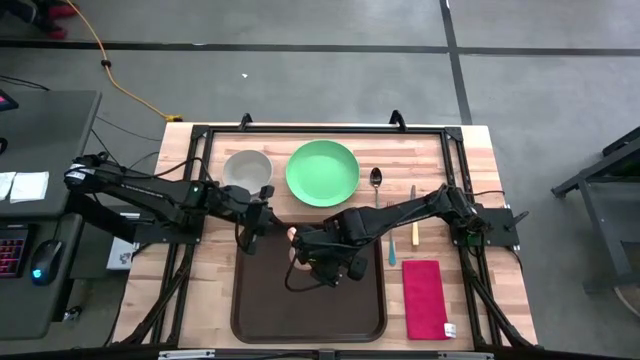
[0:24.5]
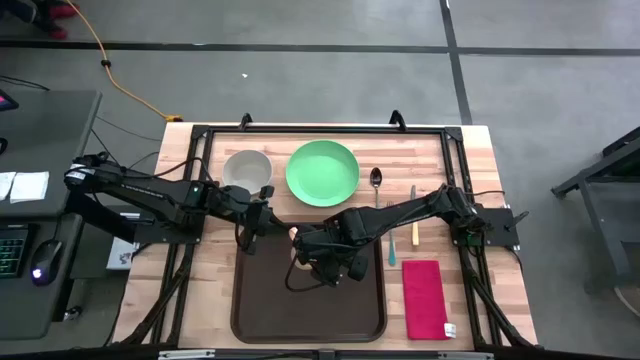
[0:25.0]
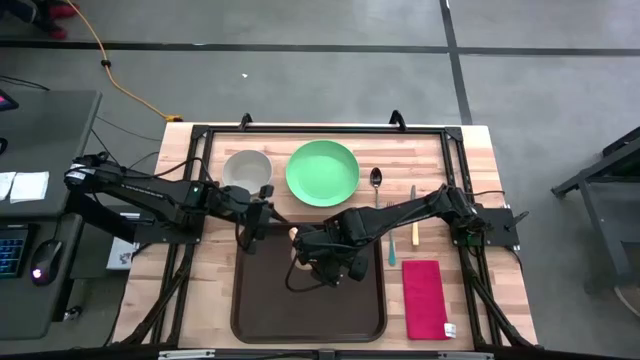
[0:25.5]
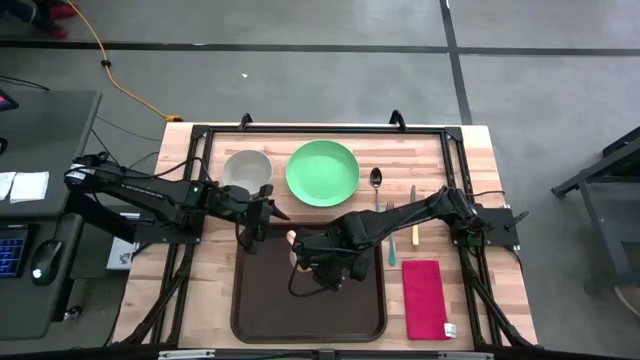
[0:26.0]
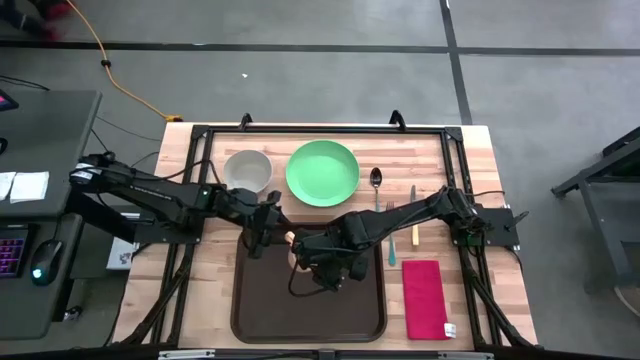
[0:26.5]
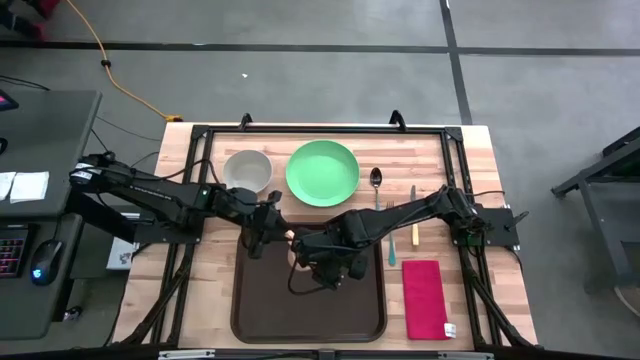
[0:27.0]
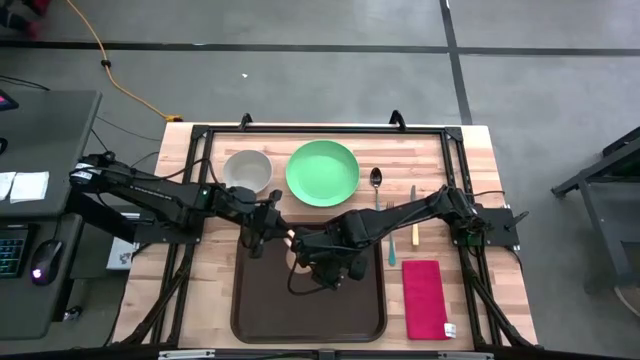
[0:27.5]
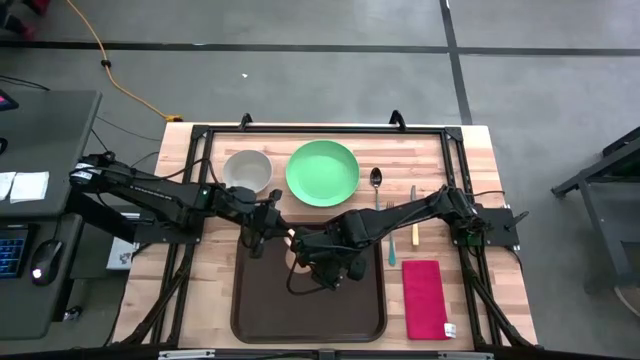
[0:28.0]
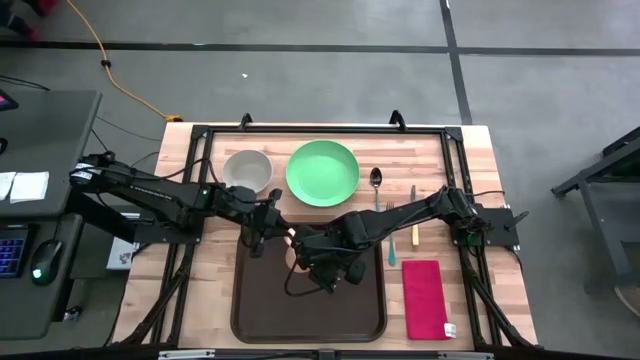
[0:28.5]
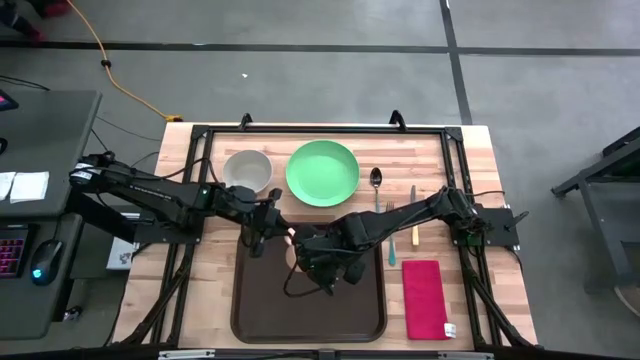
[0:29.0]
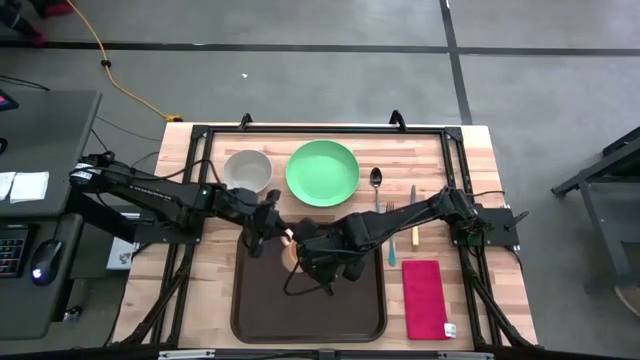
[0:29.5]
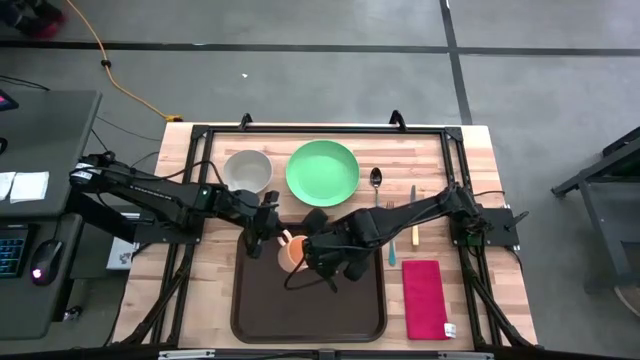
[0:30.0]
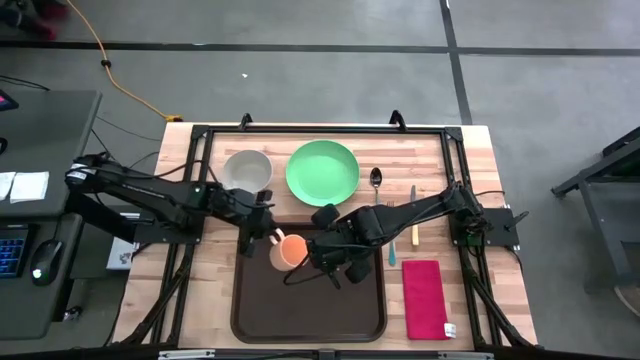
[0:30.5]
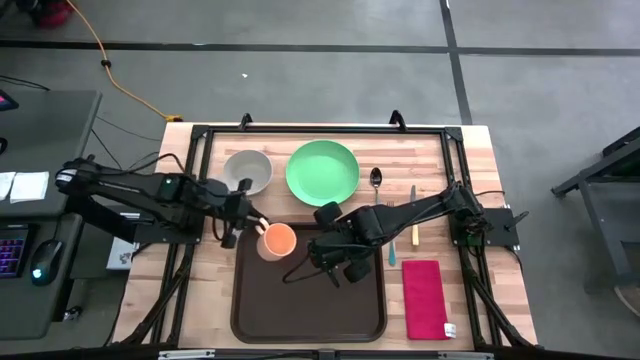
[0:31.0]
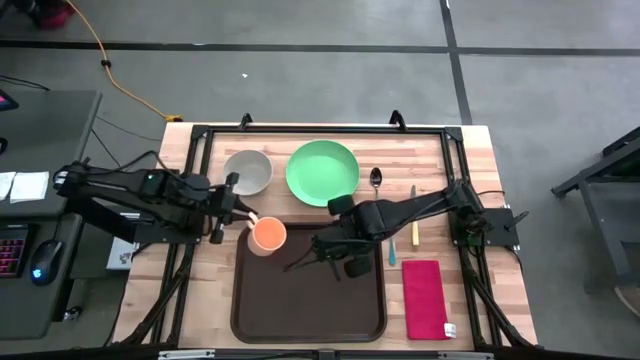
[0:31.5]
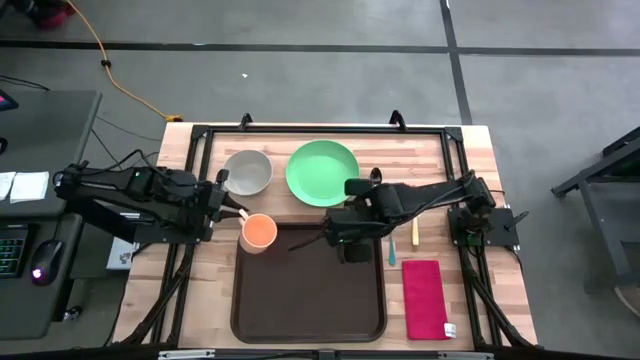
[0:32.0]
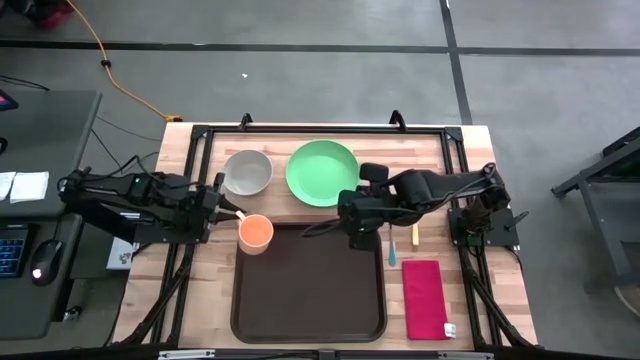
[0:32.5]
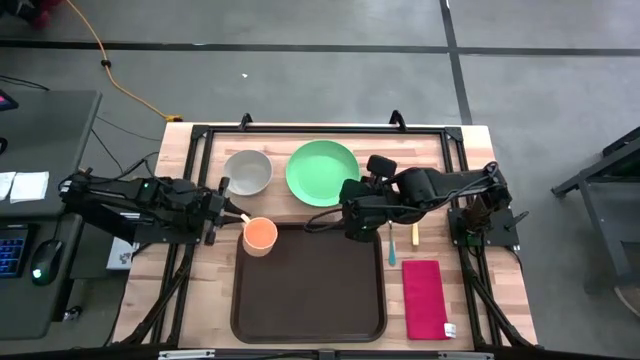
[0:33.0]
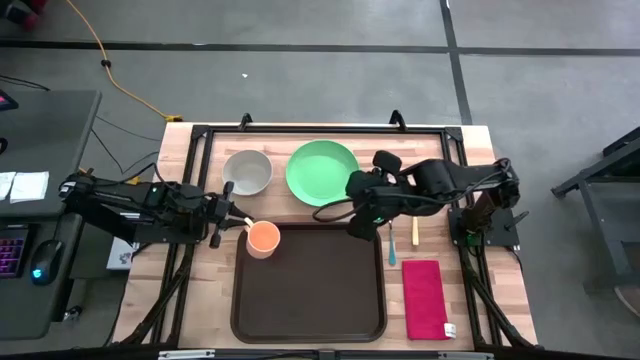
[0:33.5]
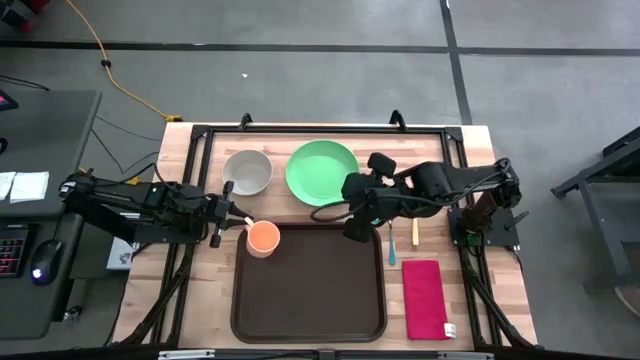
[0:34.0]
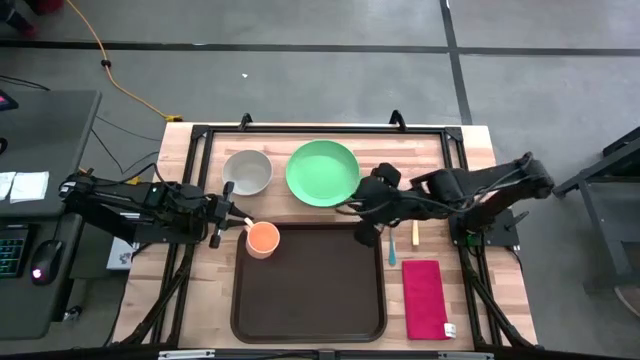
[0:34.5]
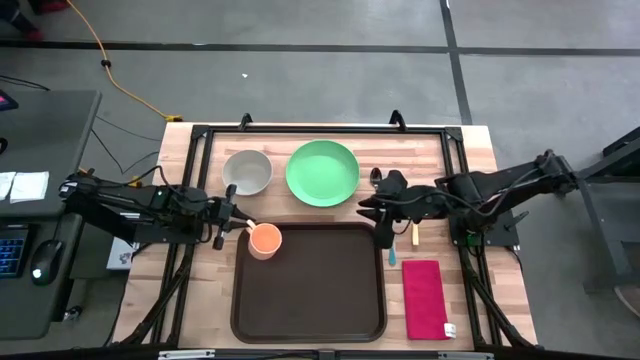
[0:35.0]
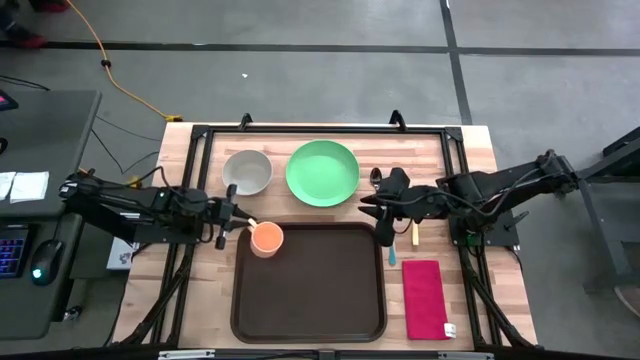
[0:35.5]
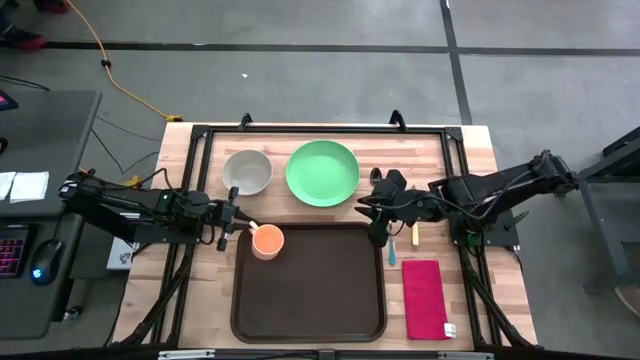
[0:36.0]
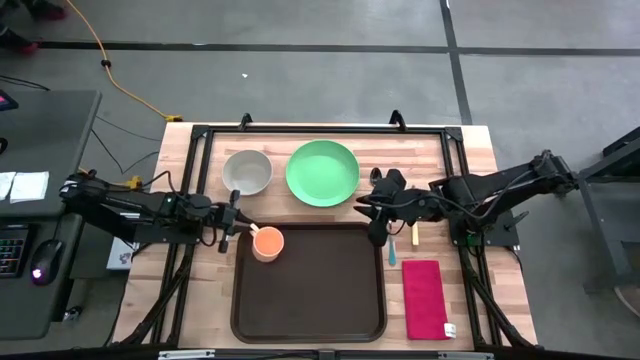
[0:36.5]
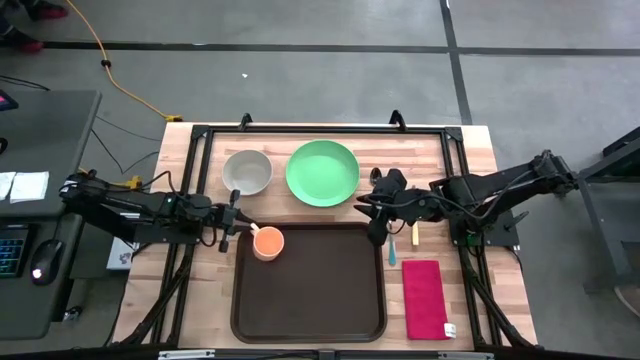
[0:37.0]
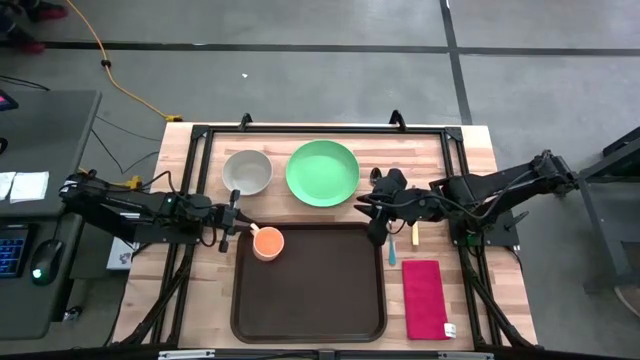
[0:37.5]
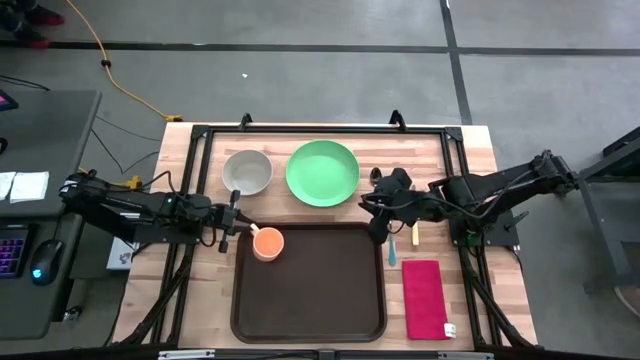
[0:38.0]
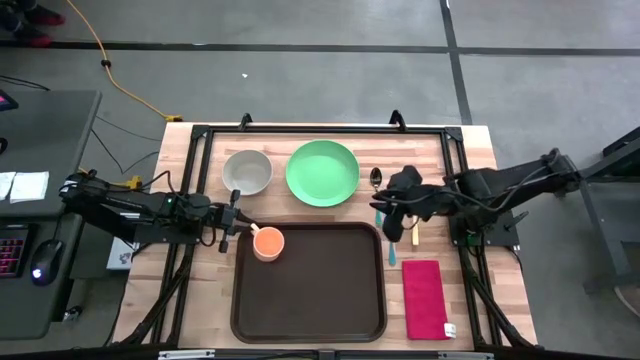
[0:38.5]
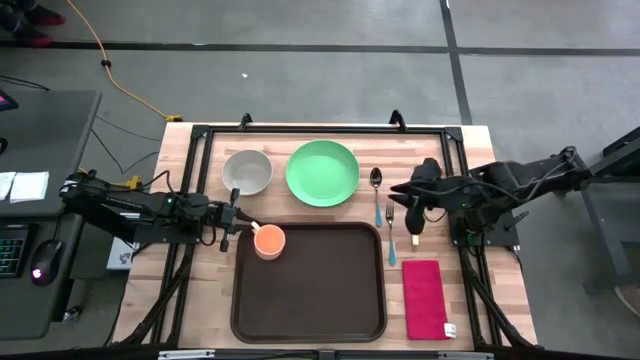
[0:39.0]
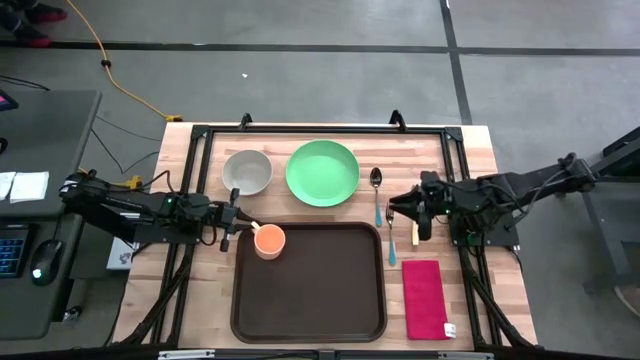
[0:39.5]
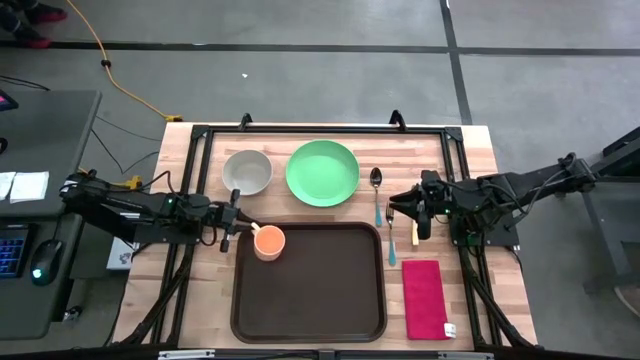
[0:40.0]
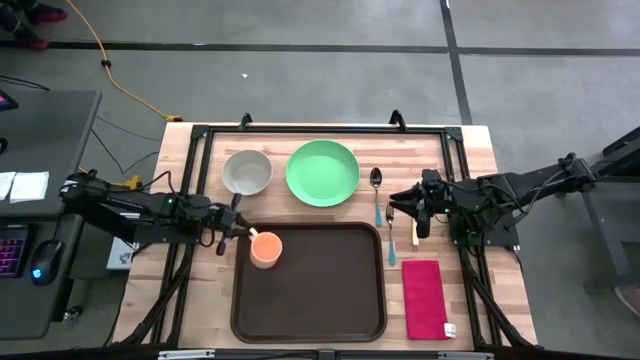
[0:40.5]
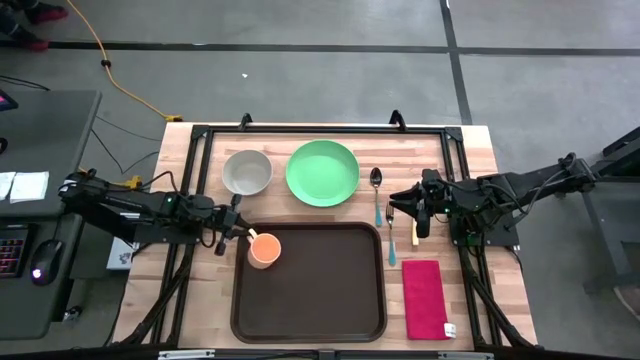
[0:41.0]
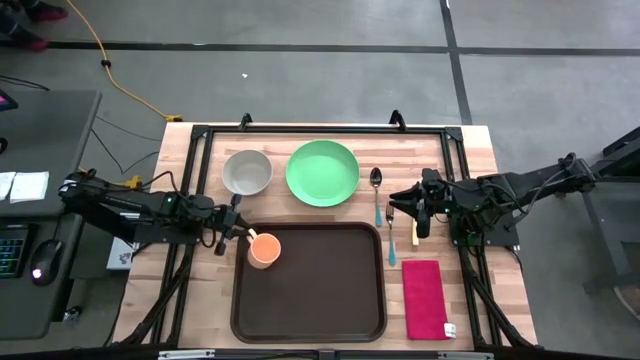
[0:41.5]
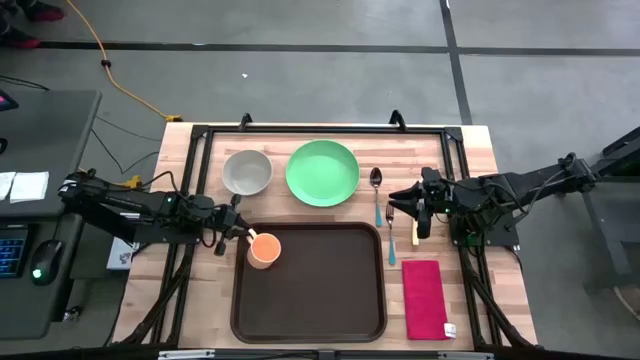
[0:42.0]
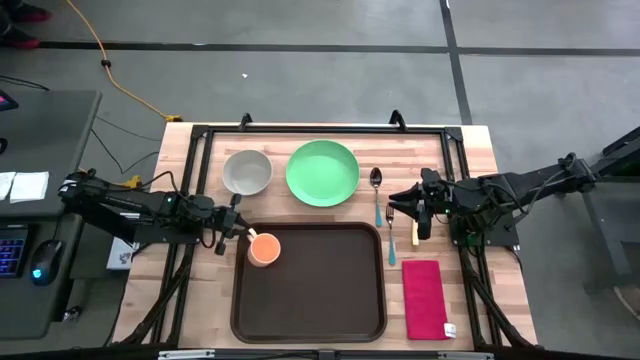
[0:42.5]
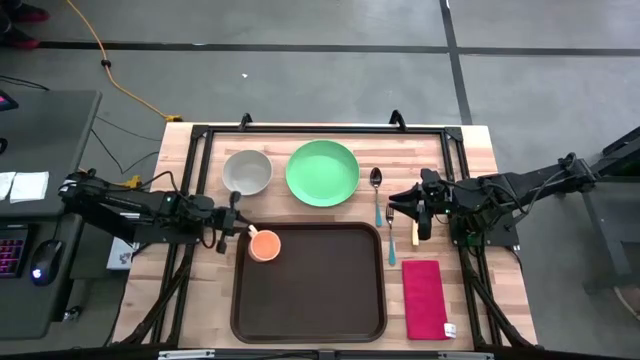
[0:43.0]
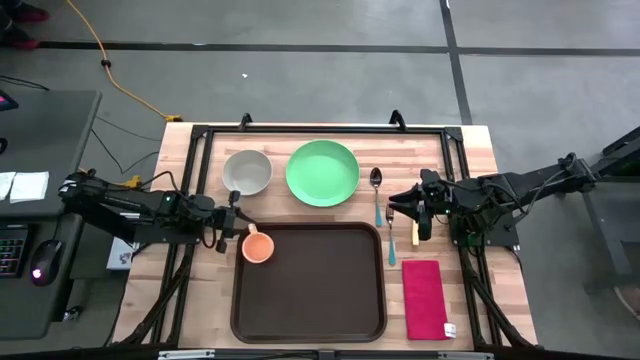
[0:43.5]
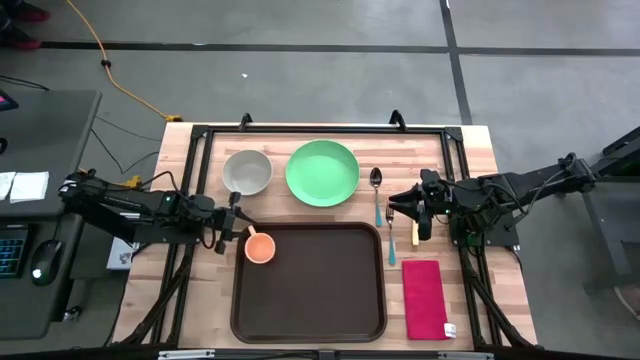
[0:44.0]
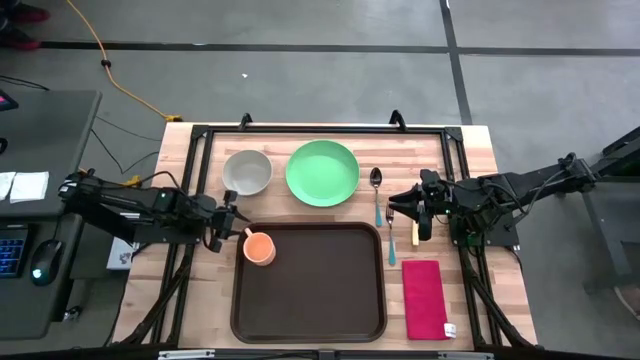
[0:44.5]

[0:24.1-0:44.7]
Task: Set up tray
Put the orange cup on the brown serving tray
